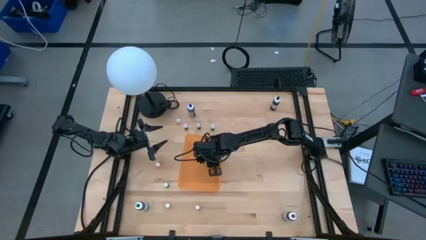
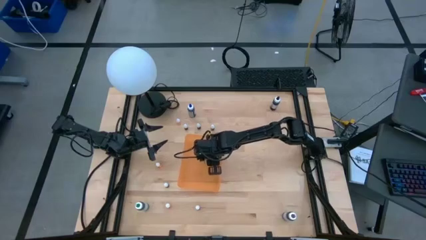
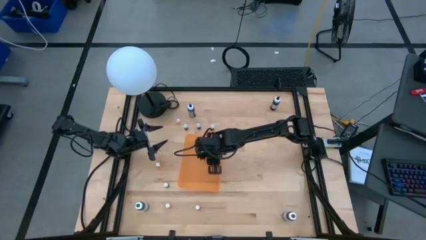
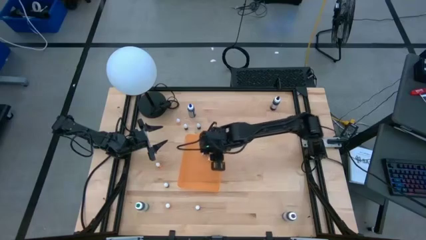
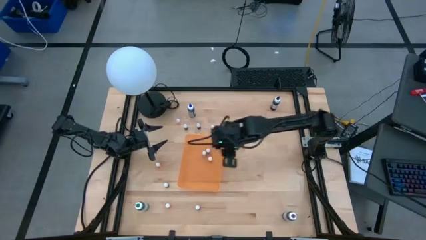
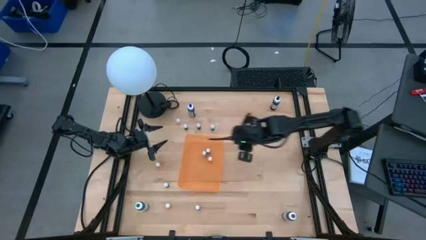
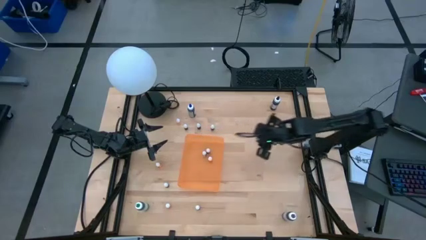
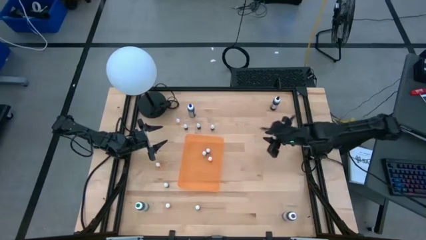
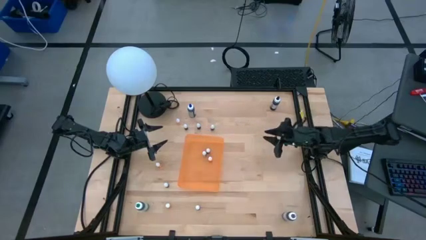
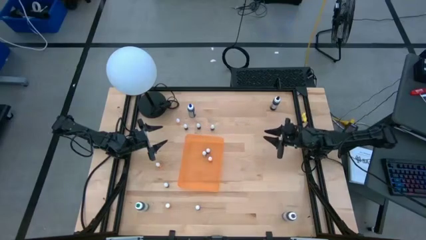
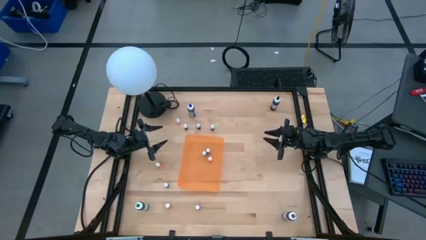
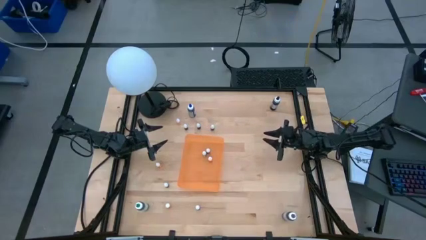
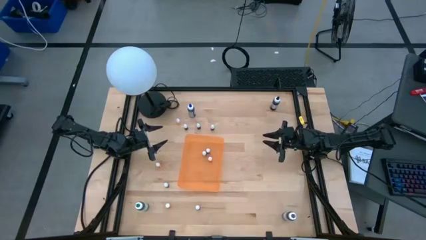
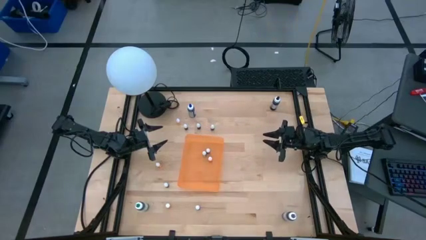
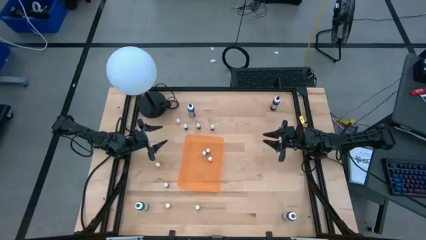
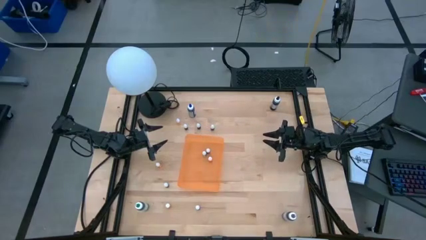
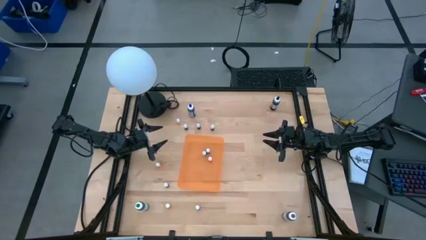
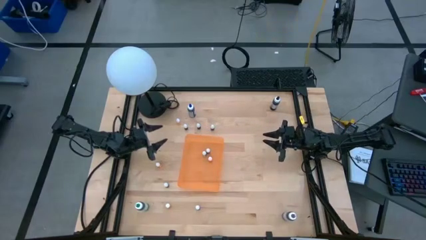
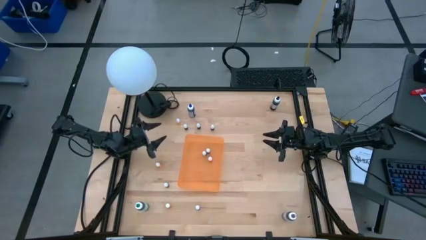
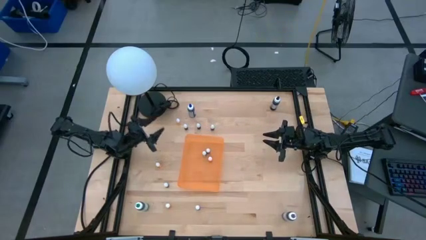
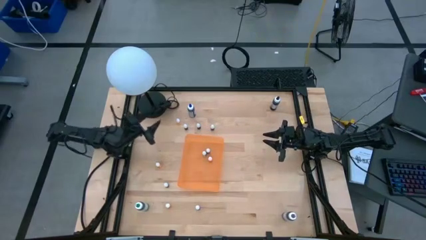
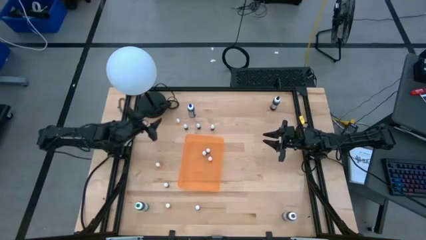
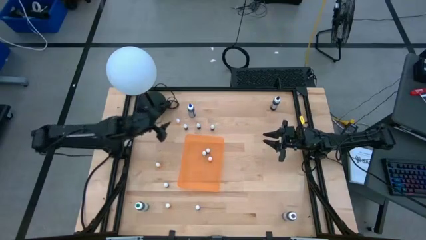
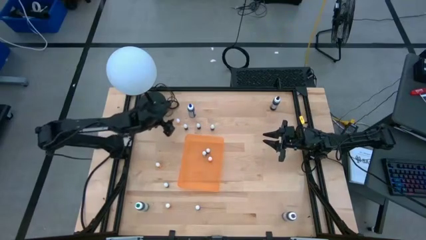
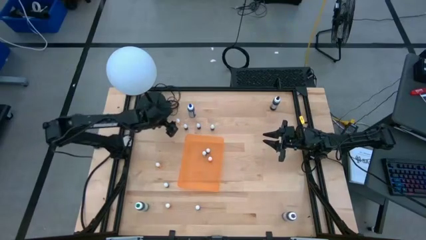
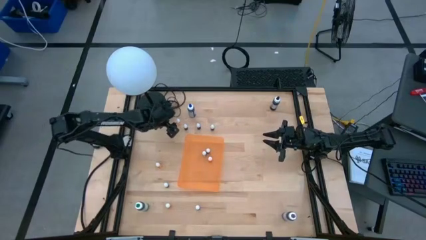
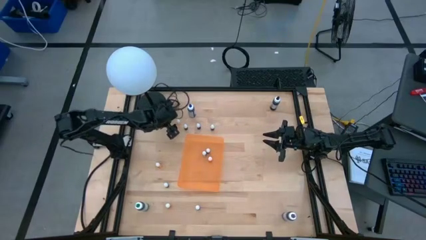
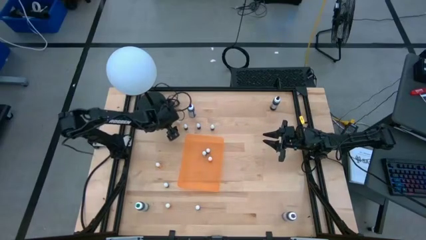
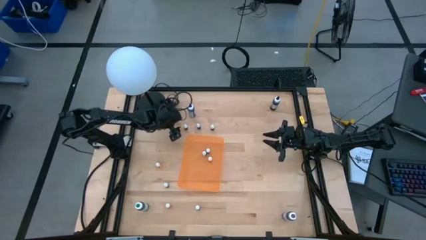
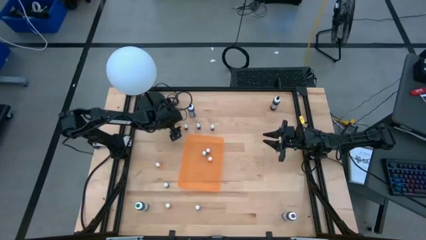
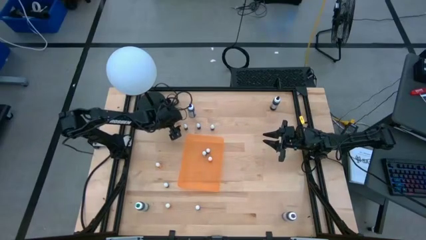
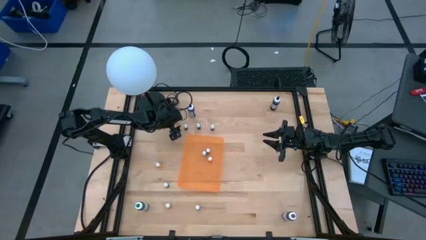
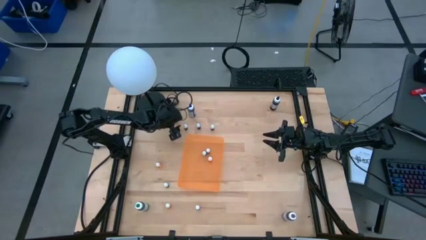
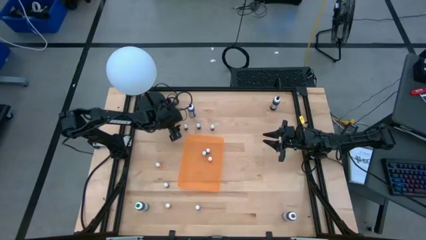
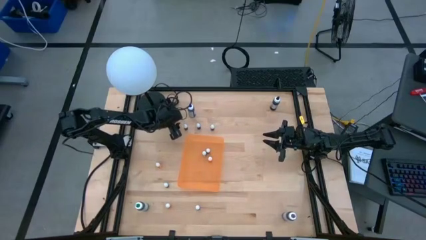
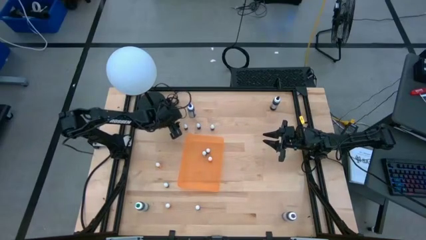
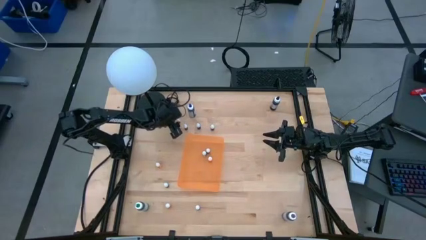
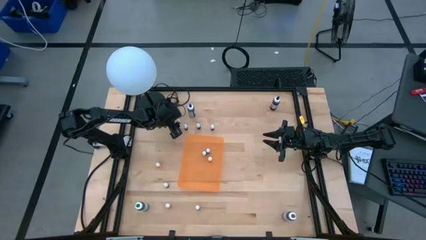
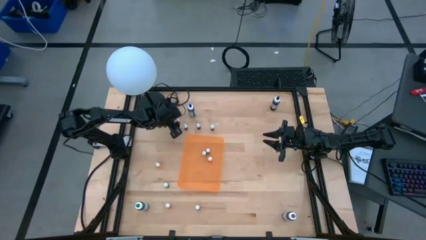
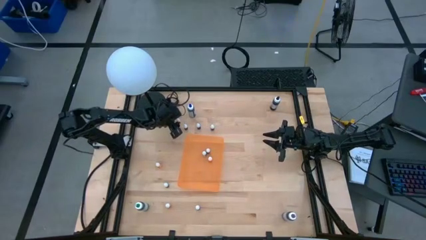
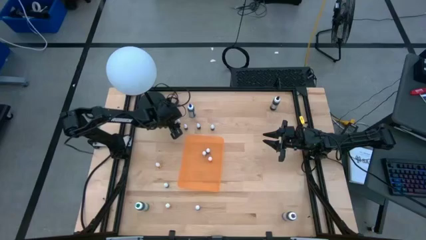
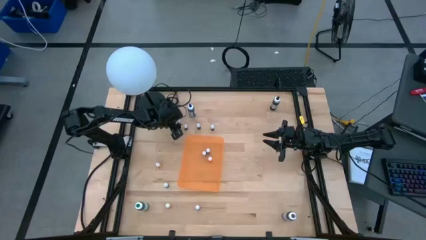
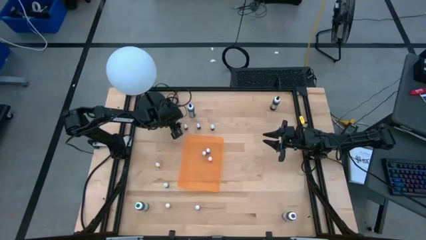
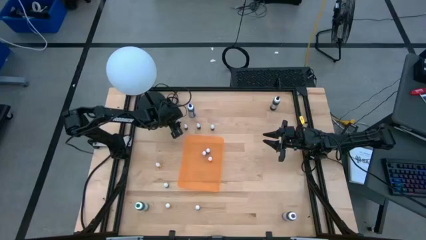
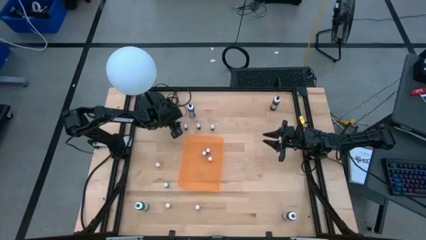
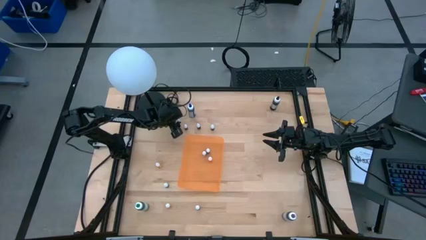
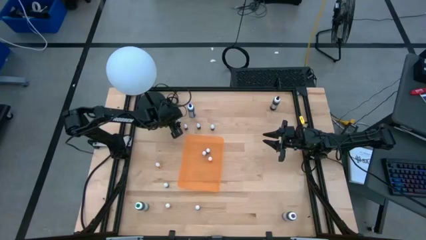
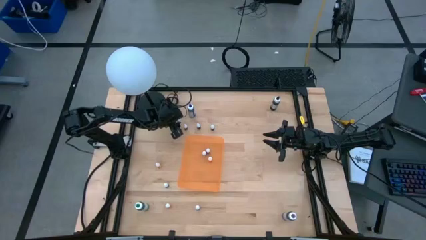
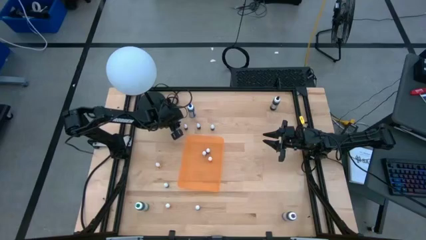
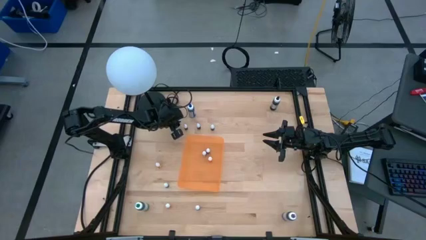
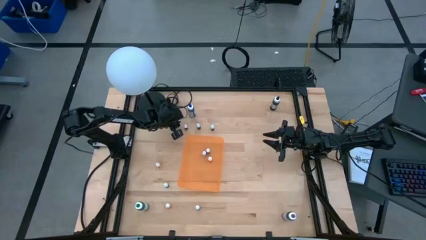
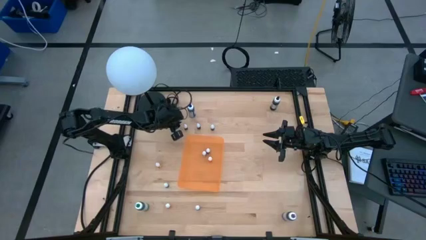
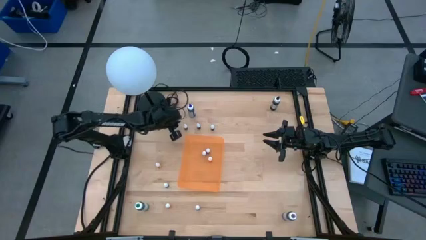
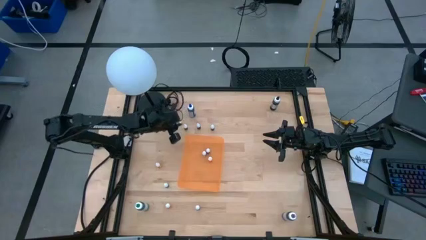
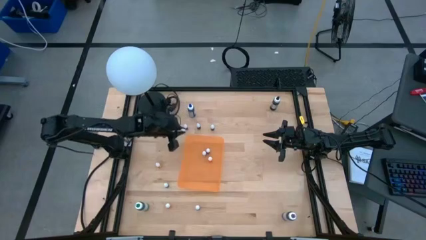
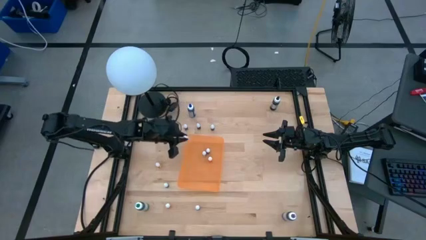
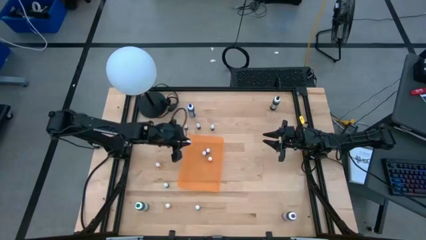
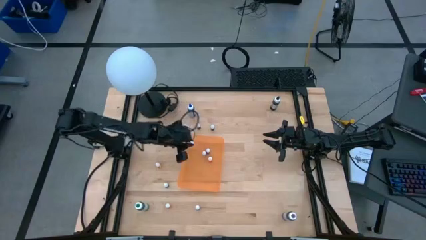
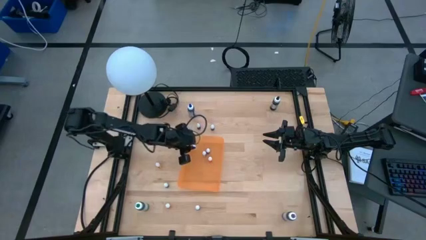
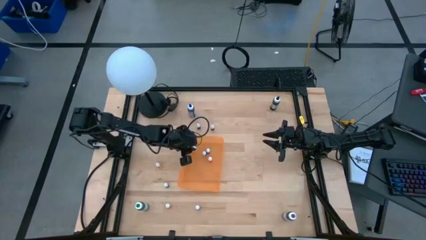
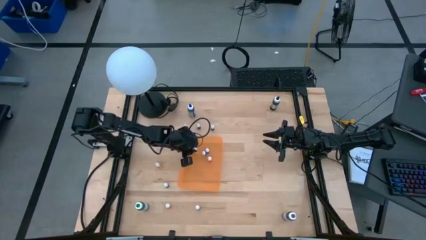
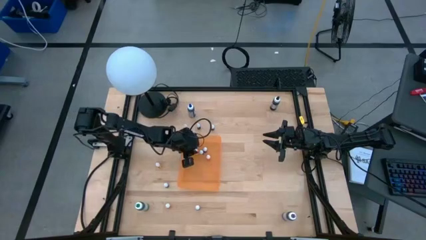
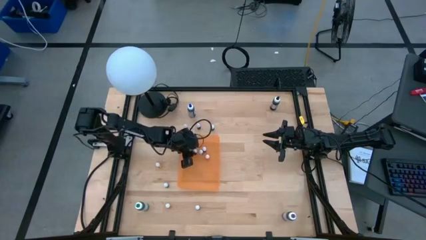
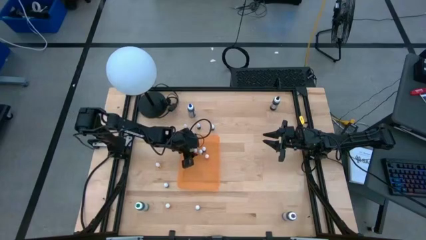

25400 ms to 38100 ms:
Task: Pick & Place food coloring
Put the small orange food coloring bottle into the orange bin

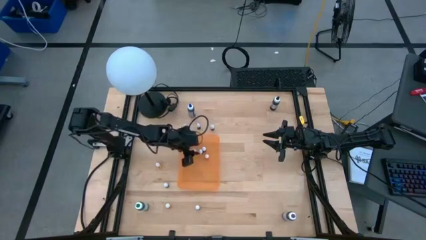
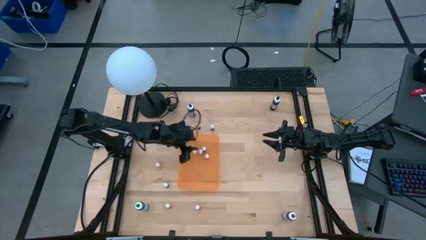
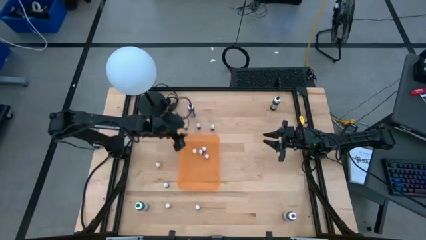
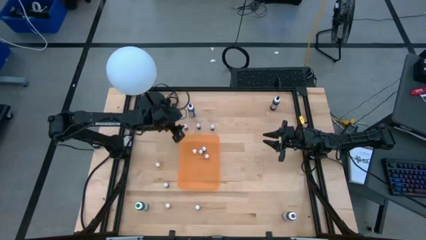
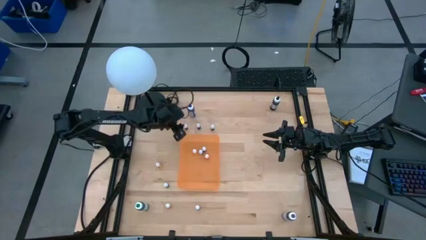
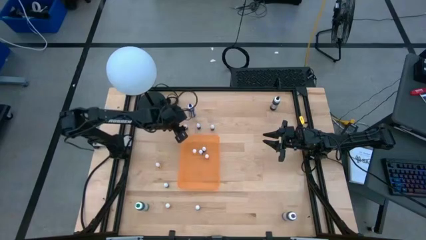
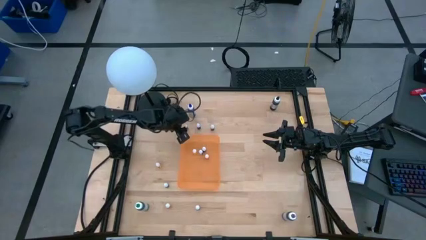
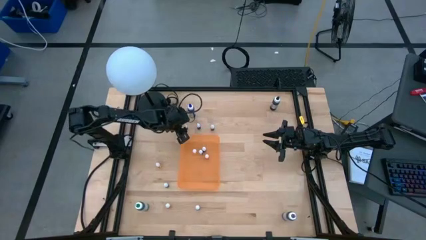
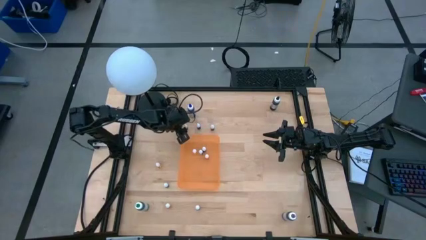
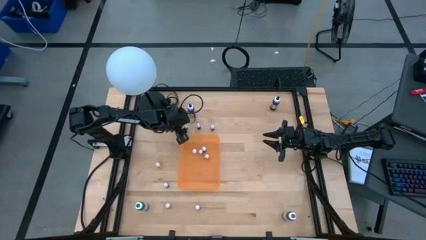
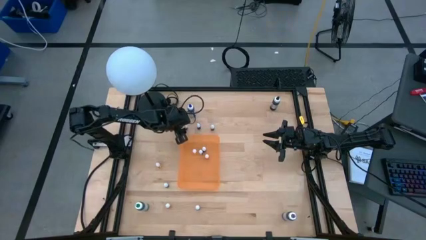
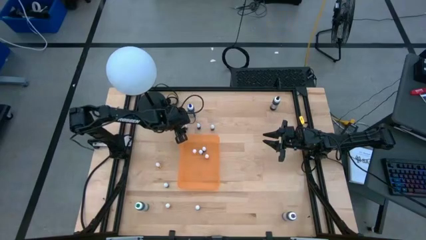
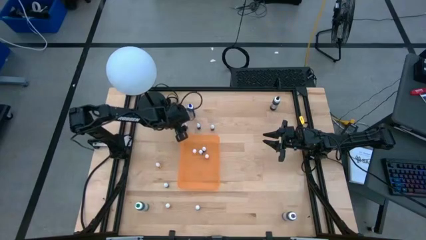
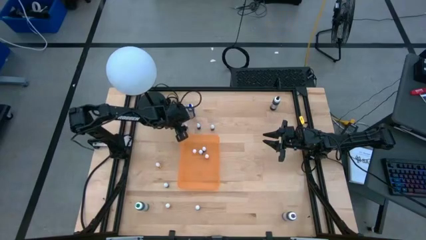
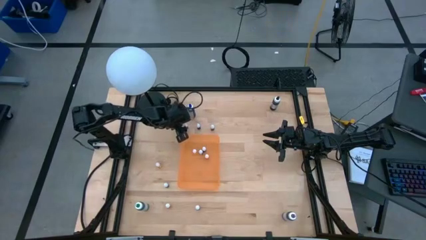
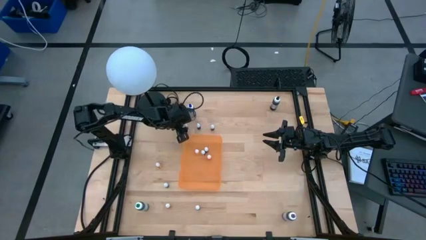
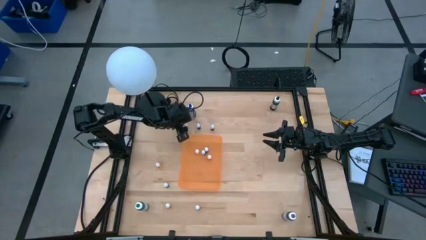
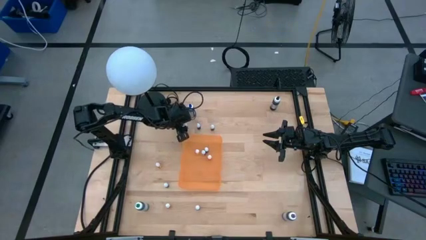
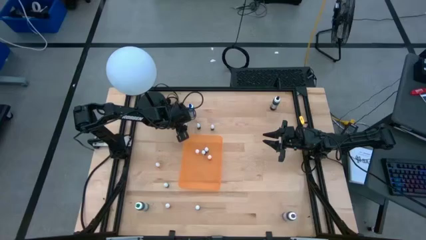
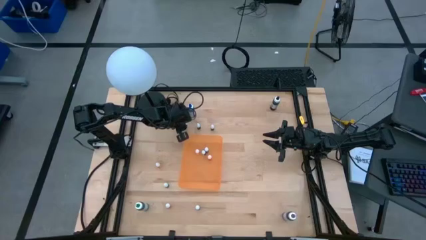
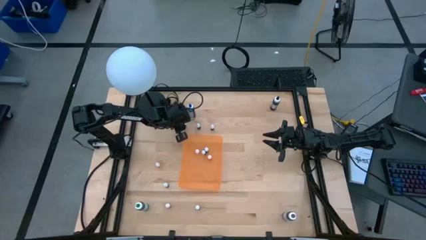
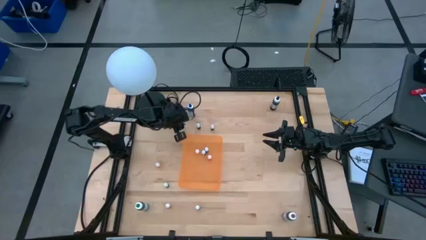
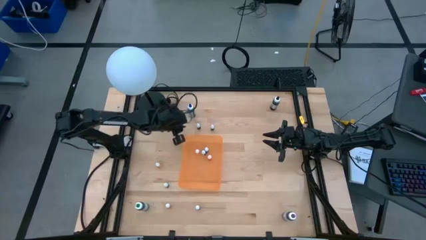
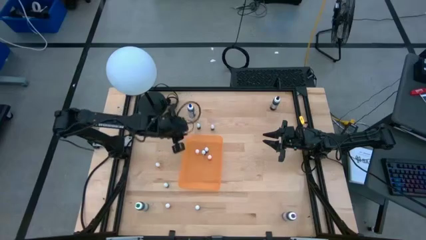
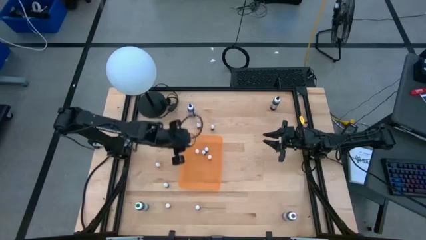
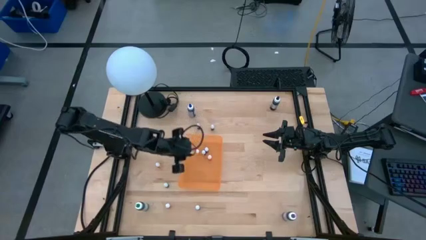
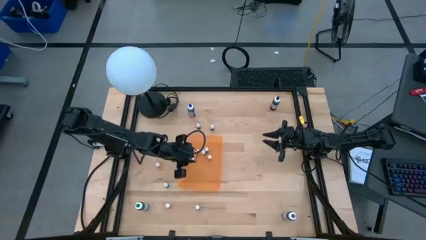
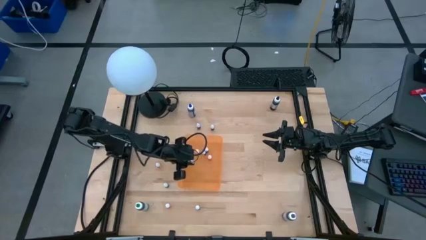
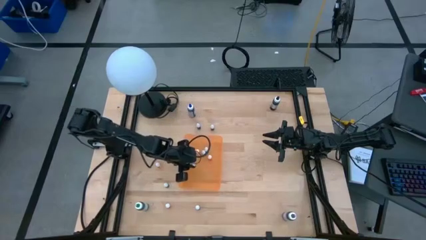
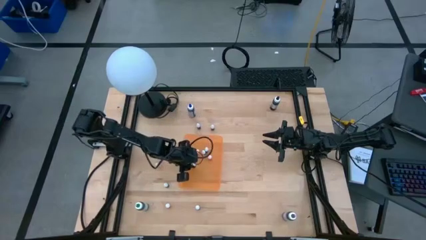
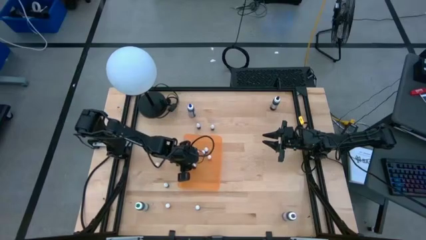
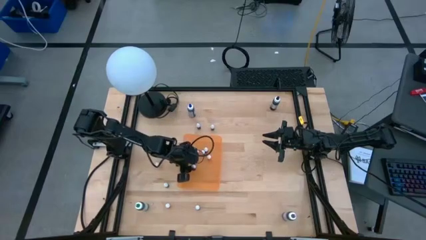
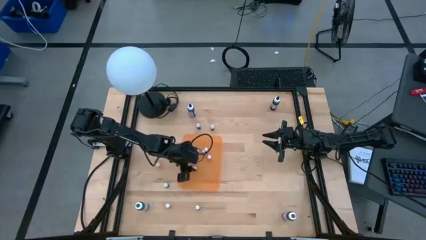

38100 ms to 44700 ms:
Put the small red food coloring bottle into the orange bin
